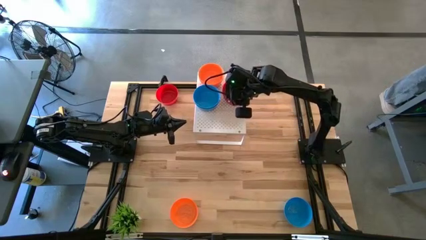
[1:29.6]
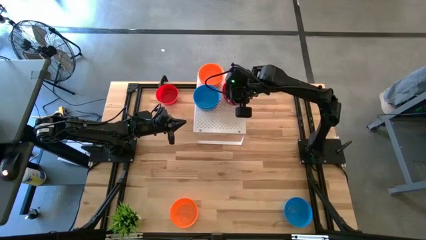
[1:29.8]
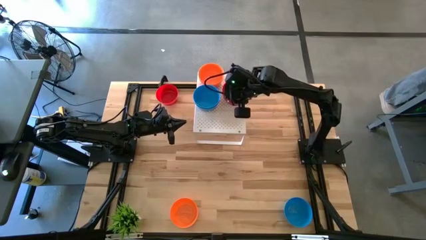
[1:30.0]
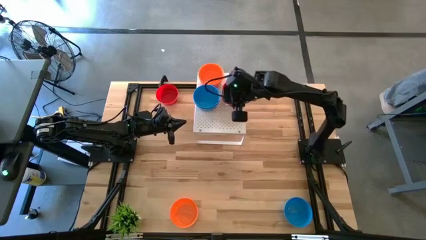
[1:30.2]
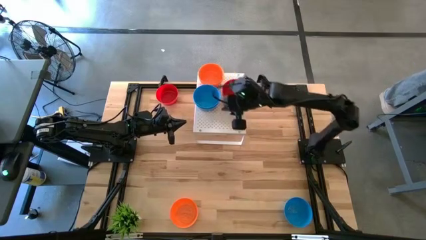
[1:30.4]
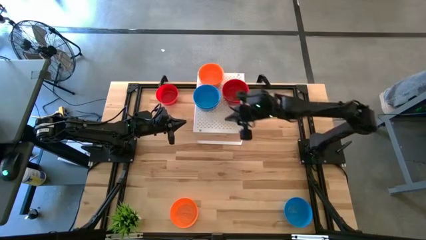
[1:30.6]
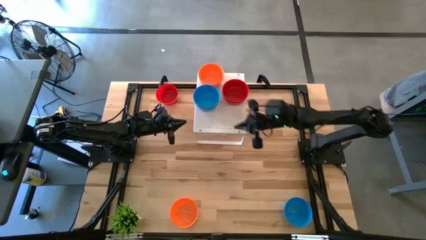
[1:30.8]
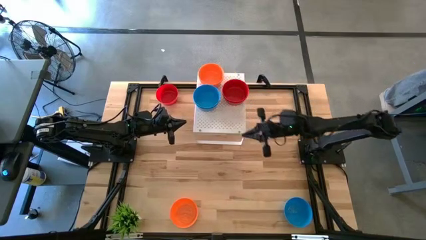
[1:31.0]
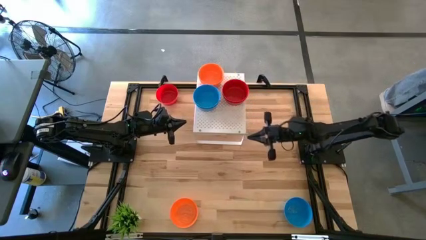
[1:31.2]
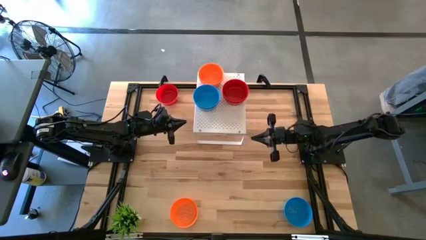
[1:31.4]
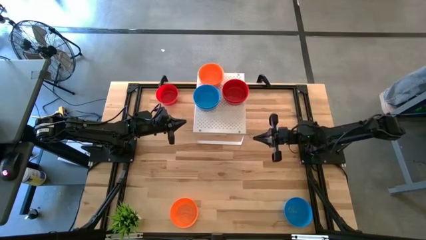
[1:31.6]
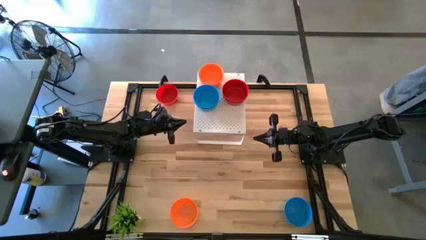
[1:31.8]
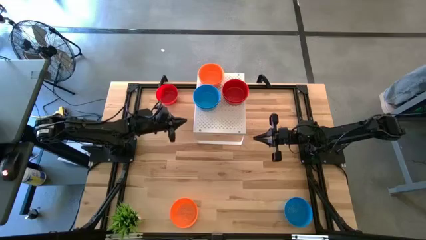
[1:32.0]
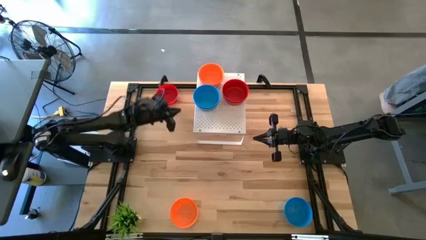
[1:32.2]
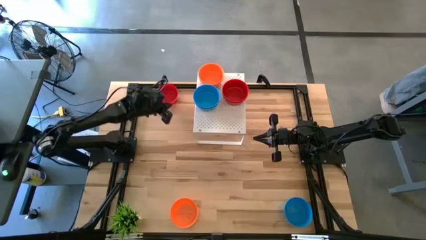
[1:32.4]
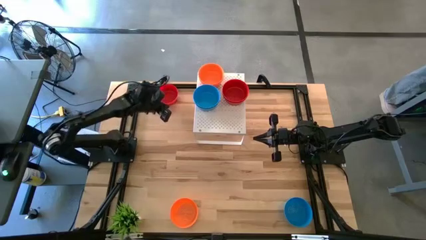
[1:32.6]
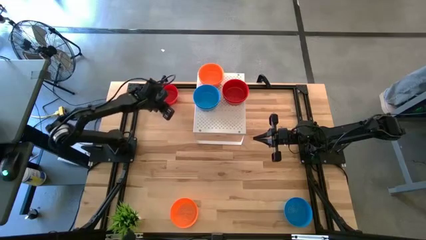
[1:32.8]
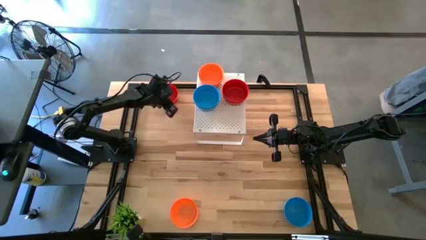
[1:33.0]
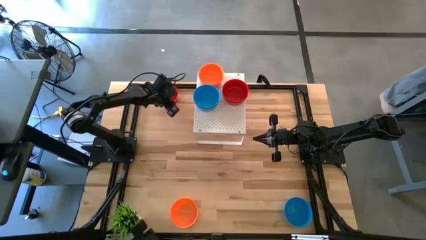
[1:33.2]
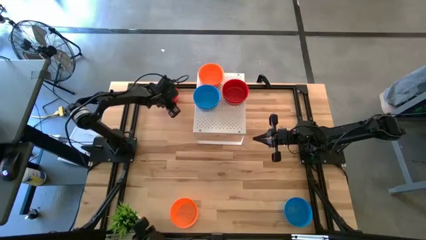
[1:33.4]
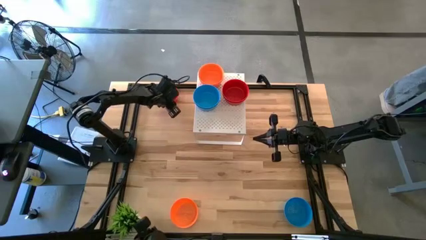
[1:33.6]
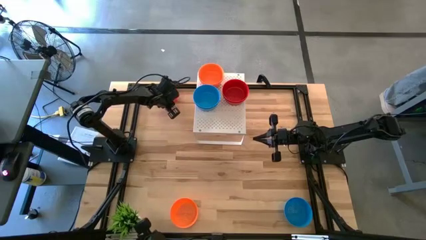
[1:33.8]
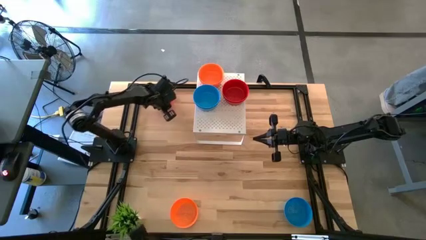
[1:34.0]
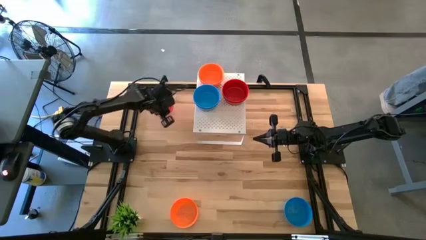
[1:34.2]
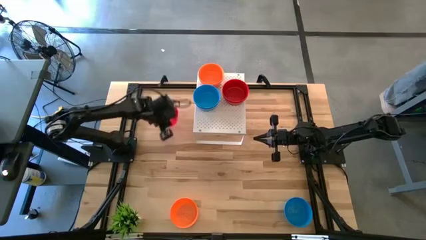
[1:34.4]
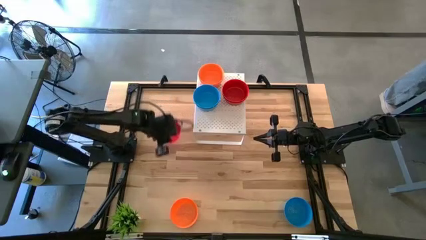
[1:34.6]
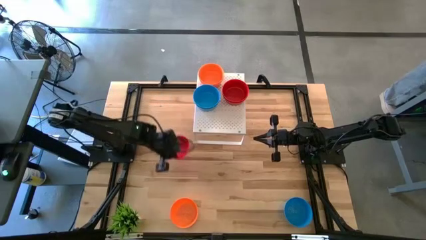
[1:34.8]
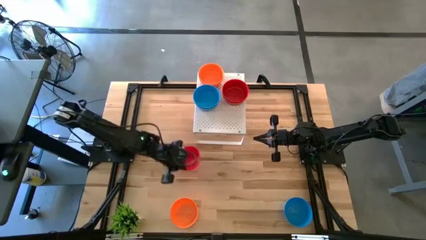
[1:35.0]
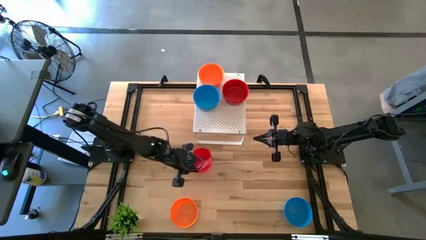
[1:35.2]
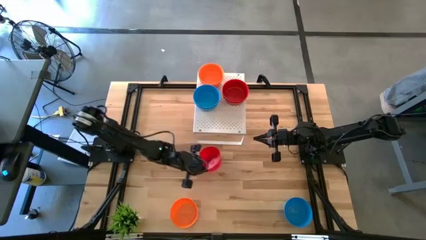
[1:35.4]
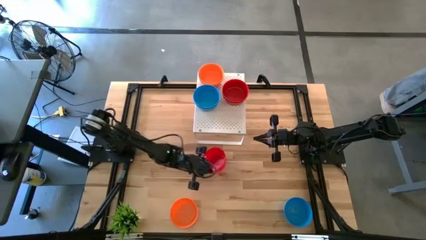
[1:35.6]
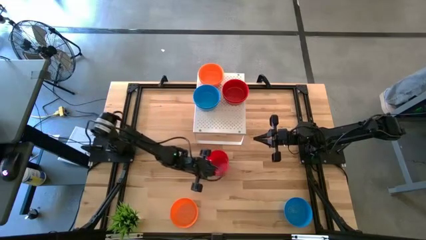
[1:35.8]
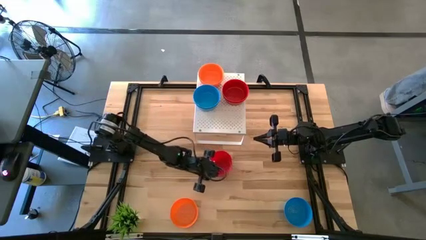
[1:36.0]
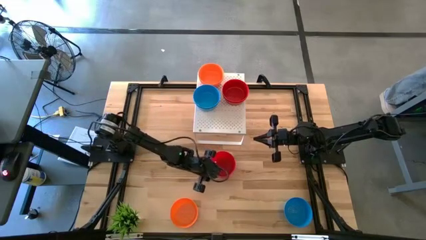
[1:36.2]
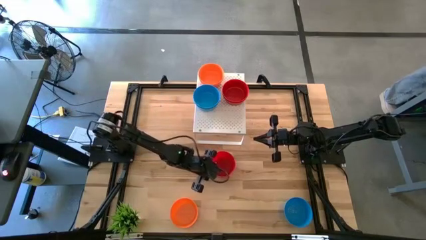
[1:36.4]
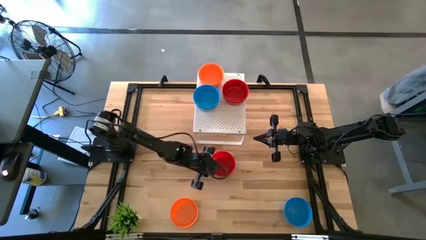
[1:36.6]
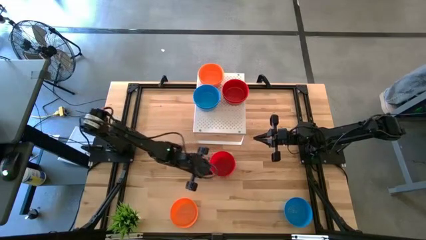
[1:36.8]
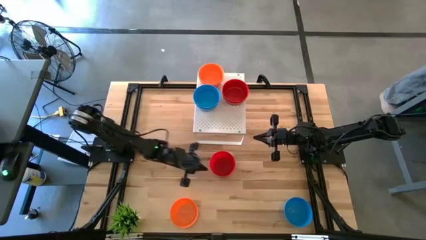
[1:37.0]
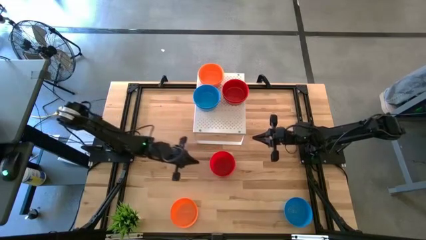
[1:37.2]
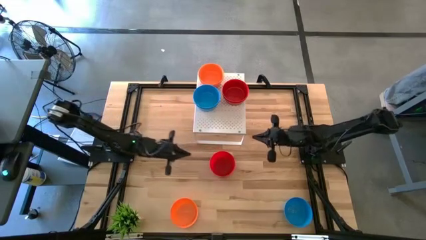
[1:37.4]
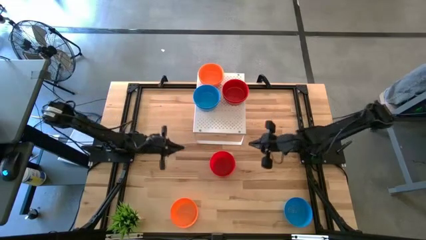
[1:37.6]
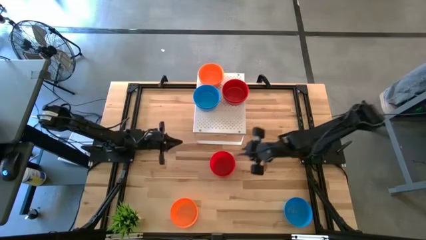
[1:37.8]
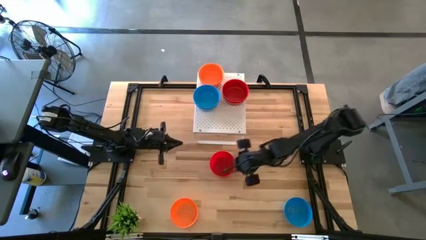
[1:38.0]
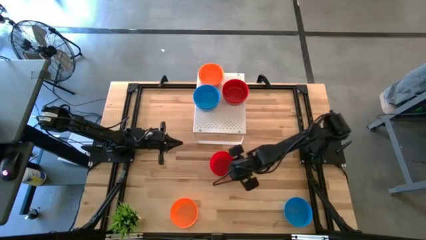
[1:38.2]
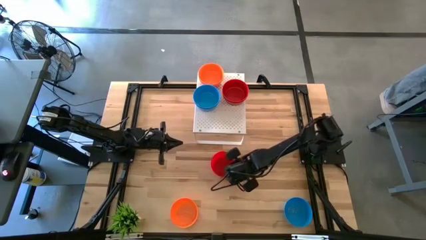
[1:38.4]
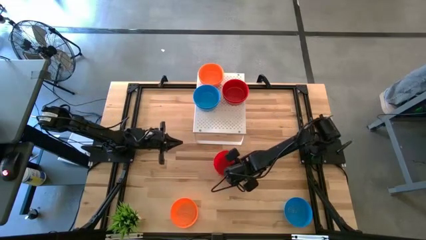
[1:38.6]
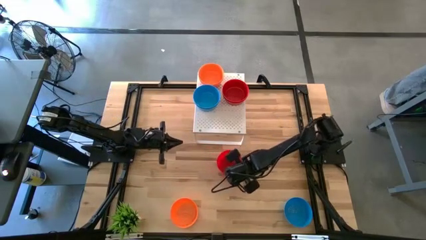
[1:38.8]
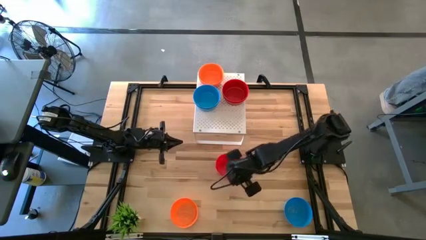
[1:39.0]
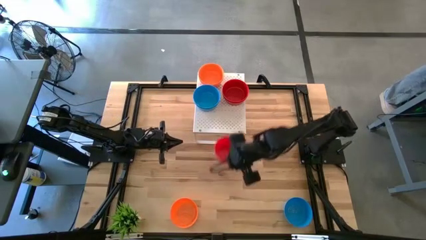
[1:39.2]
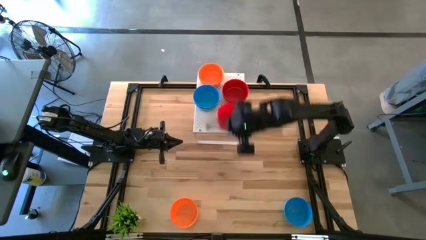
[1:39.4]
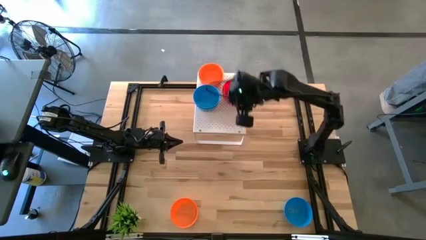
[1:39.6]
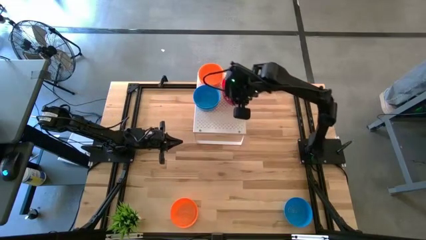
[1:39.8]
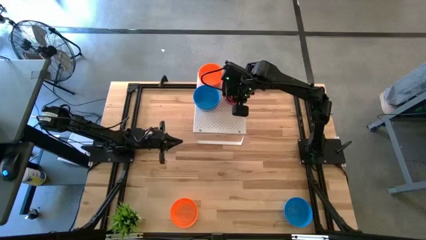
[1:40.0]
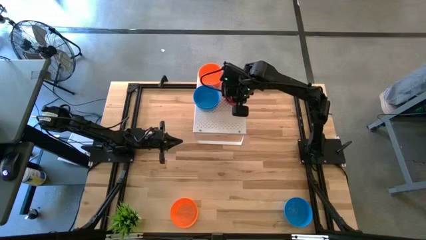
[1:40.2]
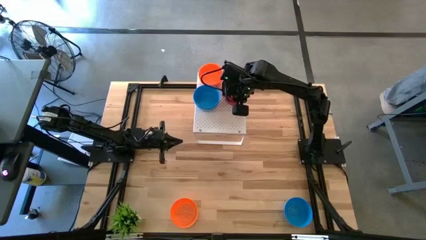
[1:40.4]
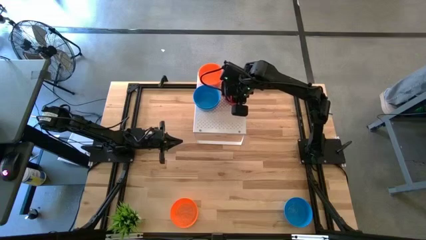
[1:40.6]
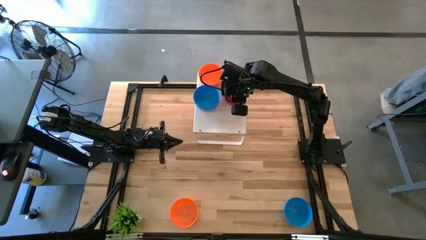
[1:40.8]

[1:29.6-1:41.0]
Task: Pick & Place Mini bowls
Stack the red bowl on top of the red bowls on the shelf

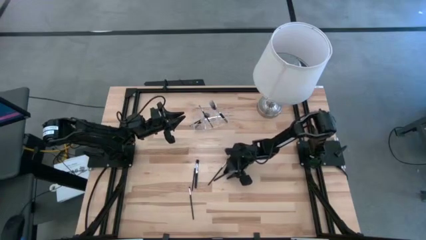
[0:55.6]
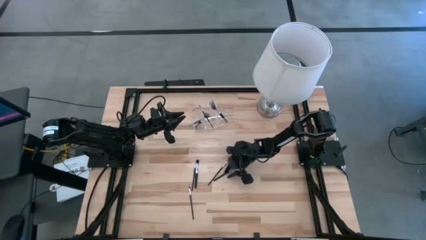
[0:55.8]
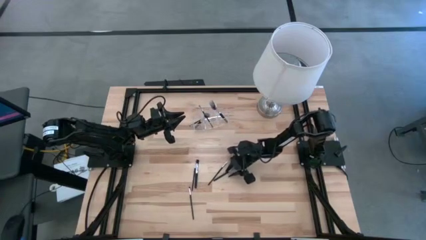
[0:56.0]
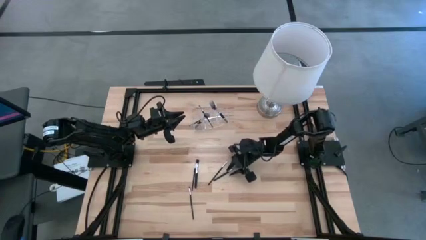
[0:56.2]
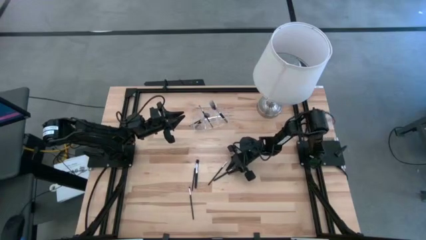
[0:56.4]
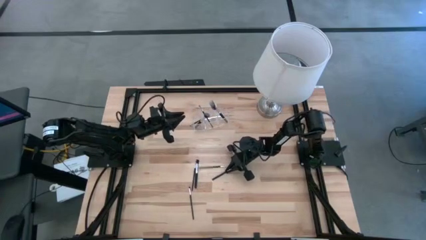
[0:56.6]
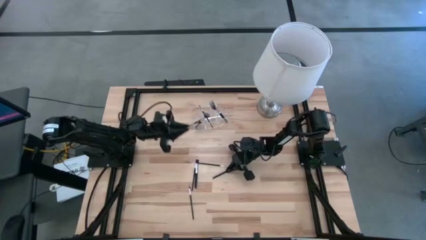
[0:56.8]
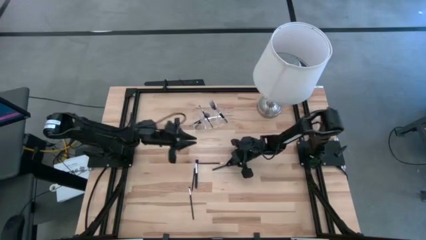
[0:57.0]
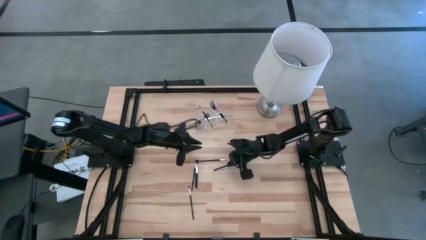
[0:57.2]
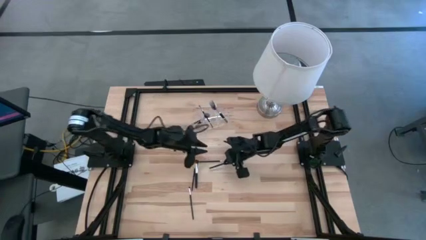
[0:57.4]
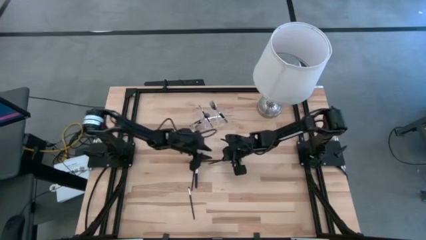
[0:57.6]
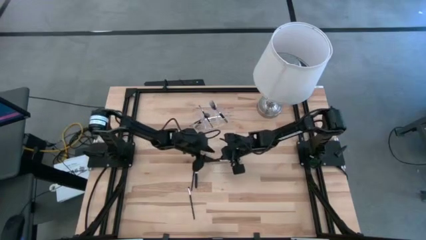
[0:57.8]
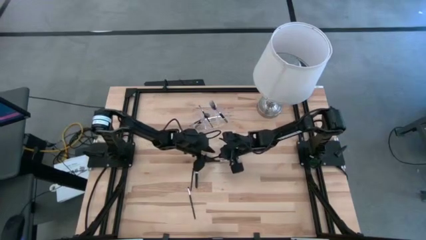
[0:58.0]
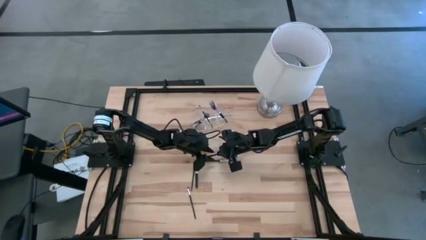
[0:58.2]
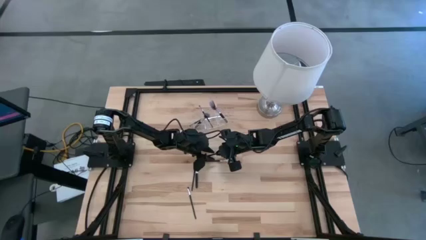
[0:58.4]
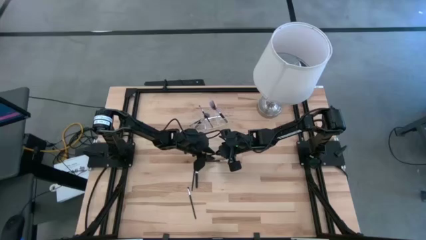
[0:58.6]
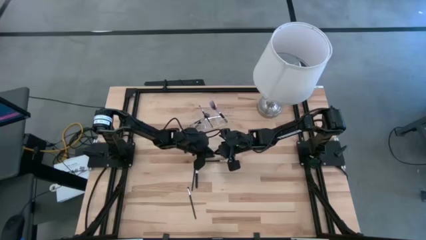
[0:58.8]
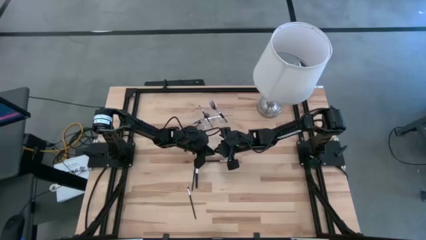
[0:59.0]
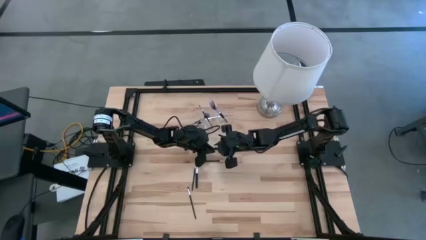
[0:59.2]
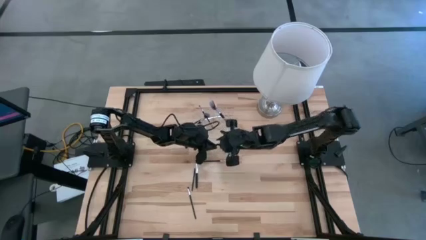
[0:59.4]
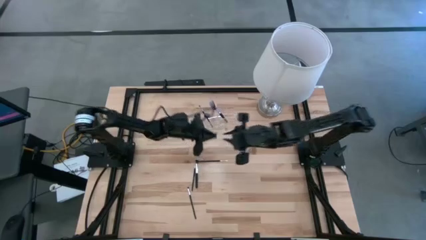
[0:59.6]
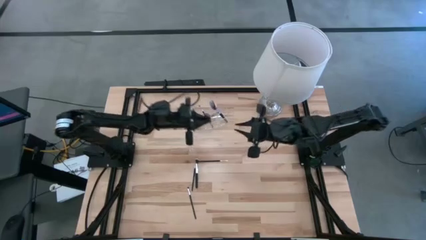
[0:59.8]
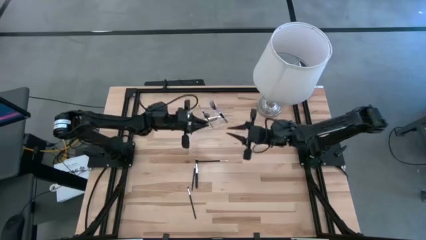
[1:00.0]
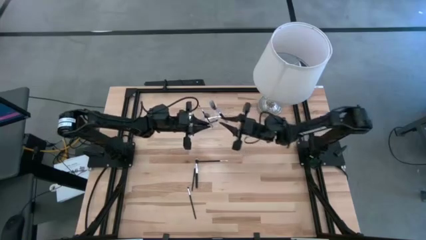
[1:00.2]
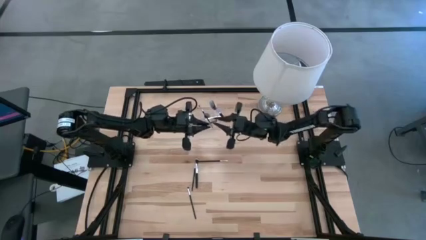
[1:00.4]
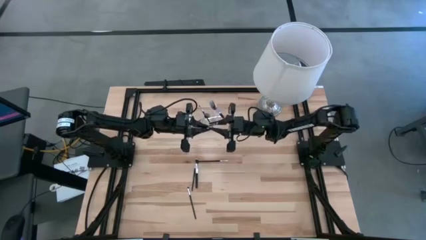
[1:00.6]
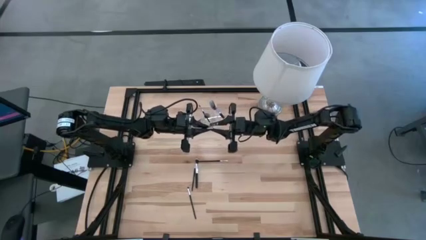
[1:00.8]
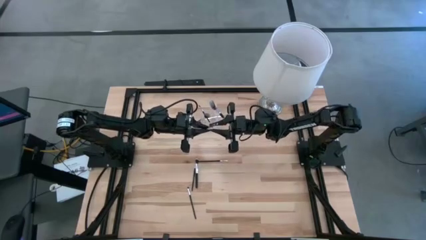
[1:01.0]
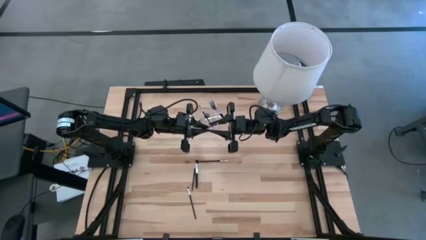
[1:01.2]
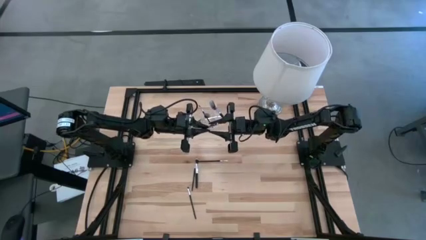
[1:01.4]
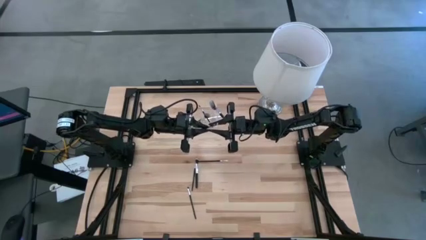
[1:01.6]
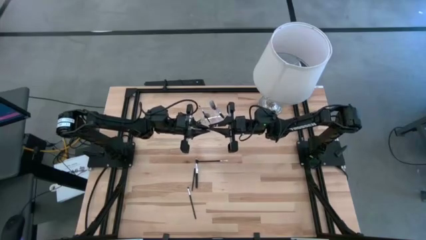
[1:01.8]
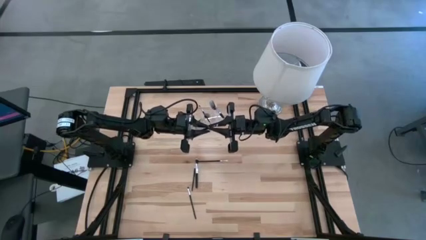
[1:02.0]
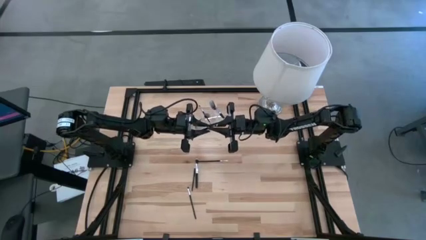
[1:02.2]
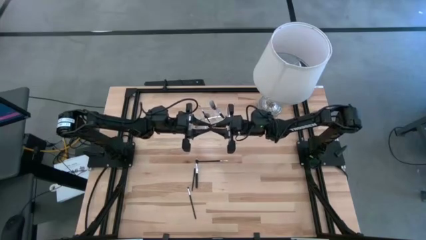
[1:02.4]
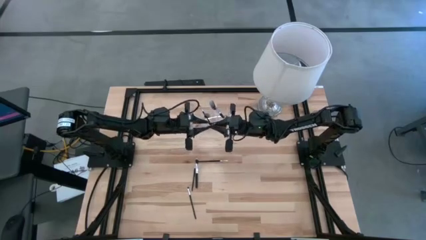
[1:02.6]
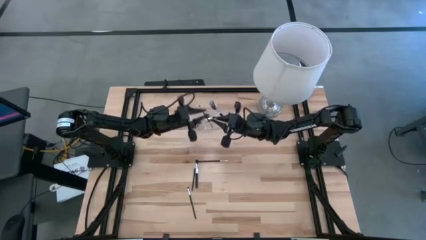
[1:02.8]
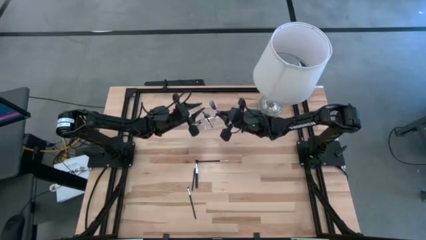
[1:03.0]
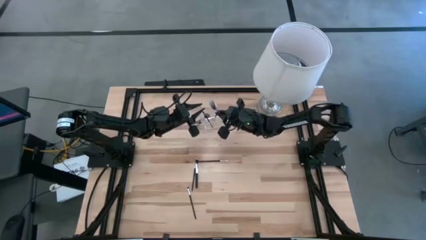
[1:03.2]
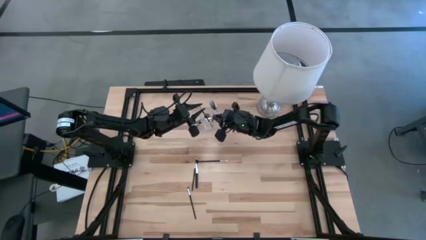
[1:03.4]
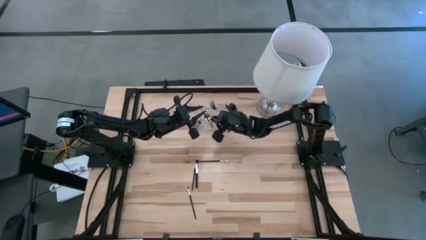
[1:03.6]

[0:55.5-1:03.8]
Task: Sort items
Put the foundation brush into the transparent organizer
